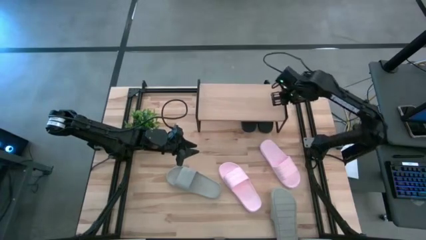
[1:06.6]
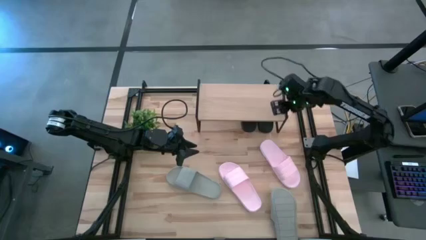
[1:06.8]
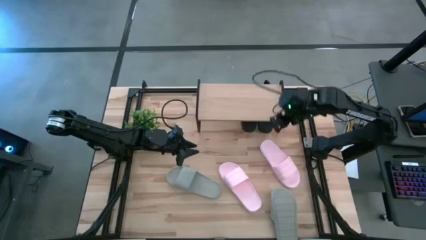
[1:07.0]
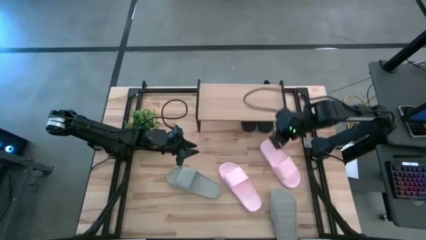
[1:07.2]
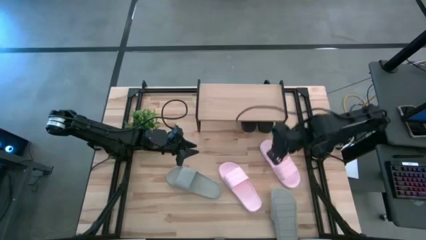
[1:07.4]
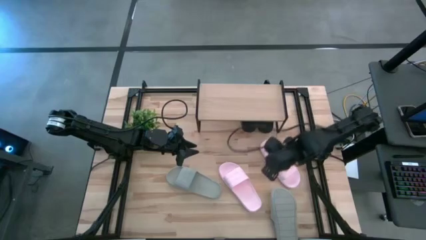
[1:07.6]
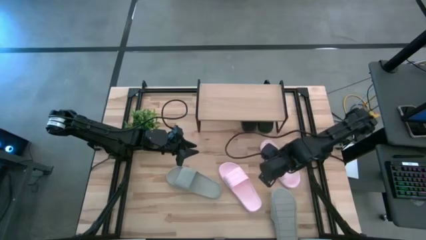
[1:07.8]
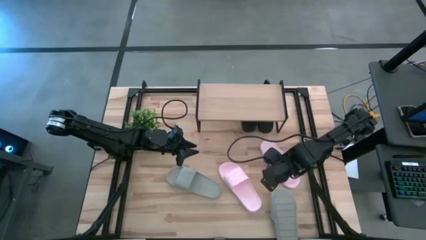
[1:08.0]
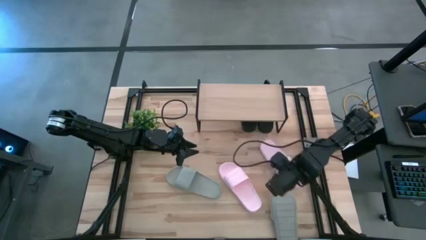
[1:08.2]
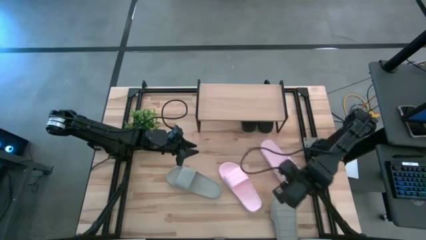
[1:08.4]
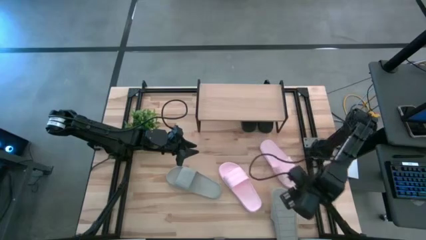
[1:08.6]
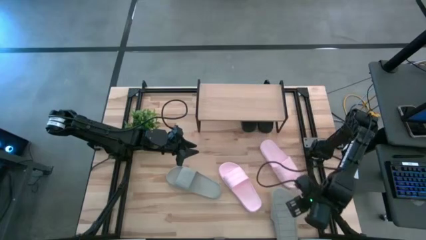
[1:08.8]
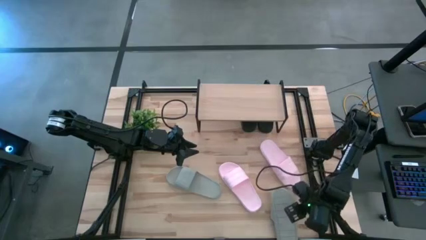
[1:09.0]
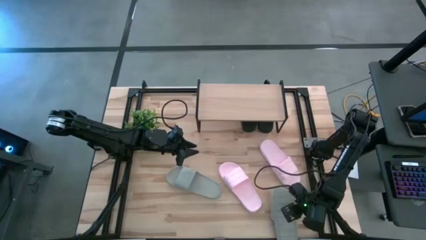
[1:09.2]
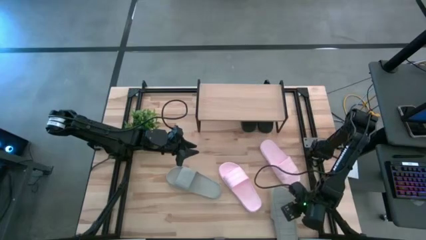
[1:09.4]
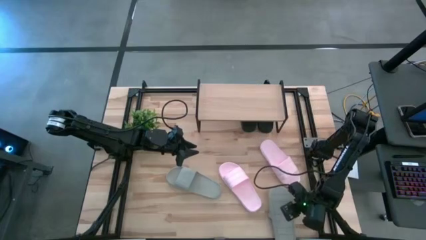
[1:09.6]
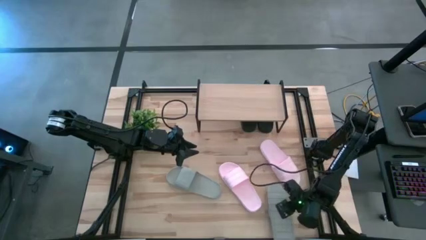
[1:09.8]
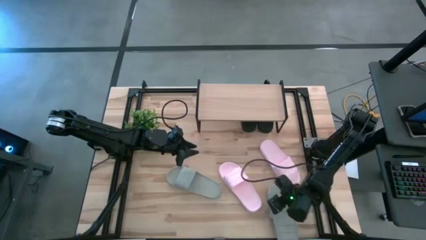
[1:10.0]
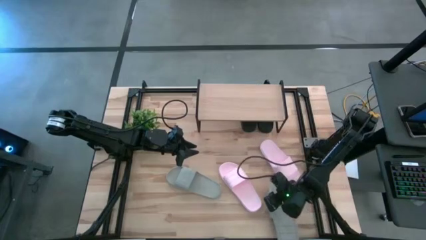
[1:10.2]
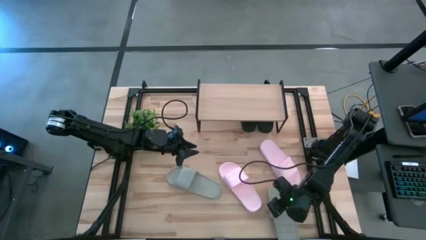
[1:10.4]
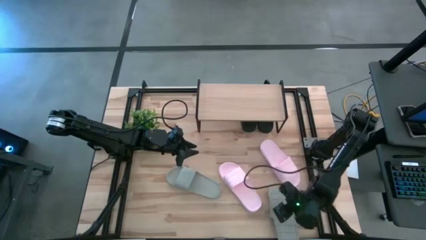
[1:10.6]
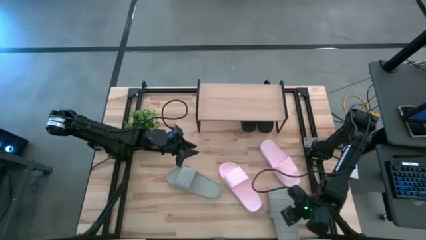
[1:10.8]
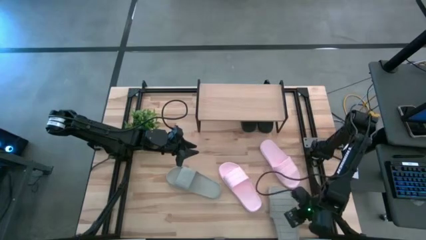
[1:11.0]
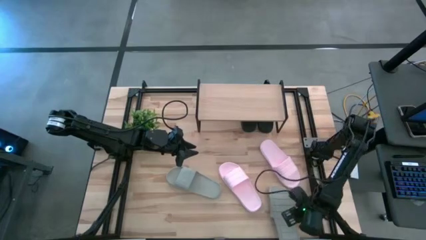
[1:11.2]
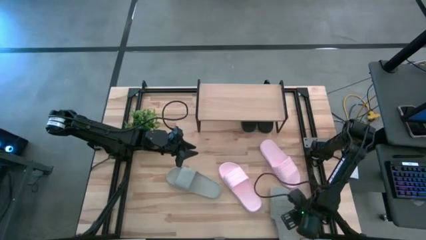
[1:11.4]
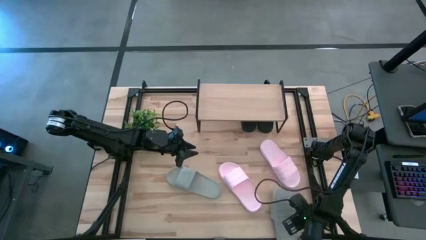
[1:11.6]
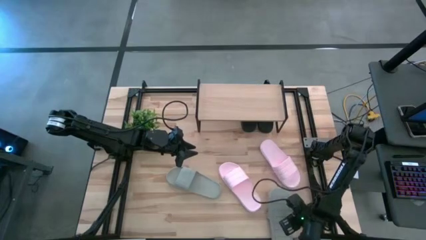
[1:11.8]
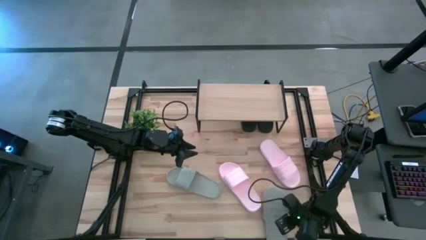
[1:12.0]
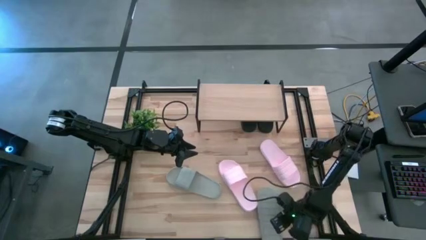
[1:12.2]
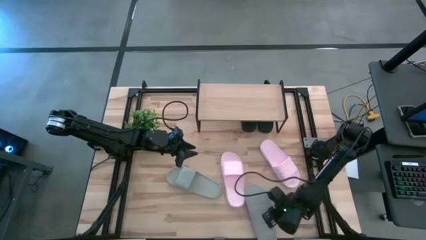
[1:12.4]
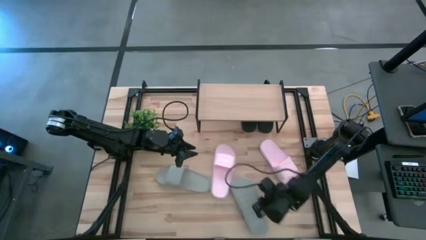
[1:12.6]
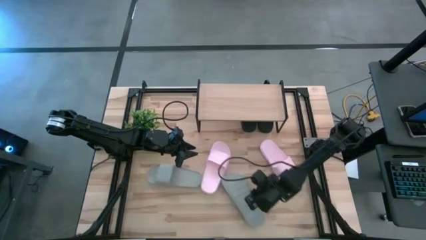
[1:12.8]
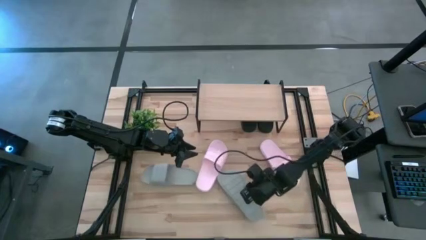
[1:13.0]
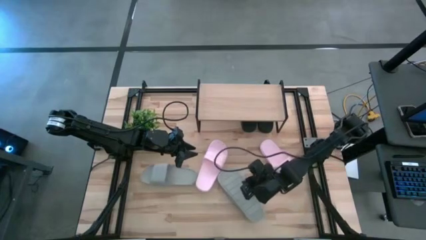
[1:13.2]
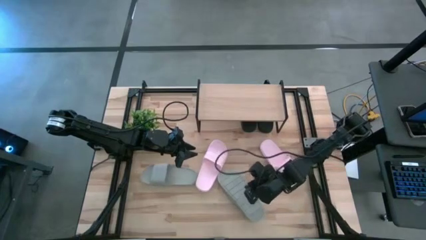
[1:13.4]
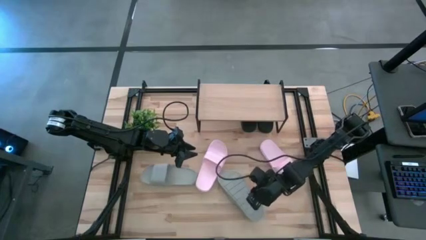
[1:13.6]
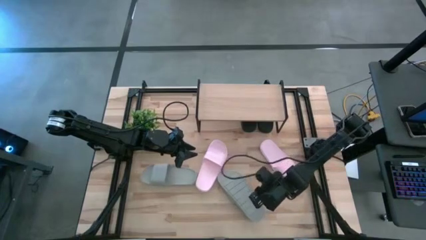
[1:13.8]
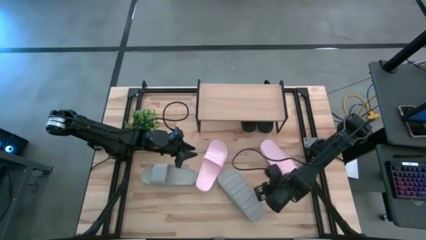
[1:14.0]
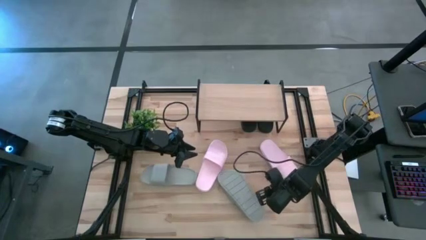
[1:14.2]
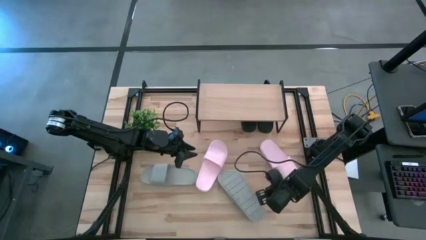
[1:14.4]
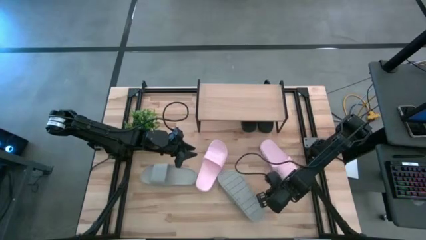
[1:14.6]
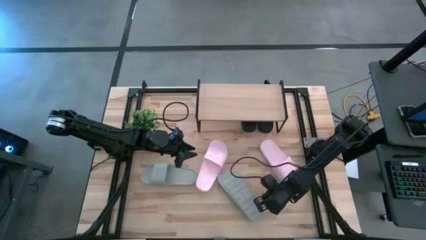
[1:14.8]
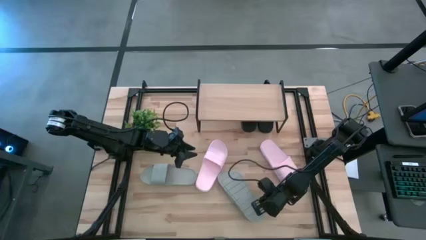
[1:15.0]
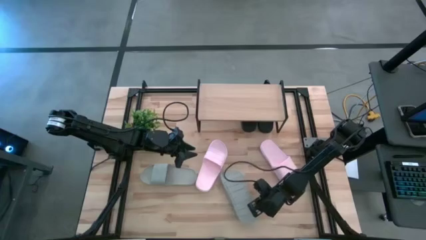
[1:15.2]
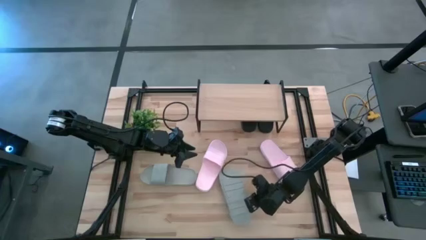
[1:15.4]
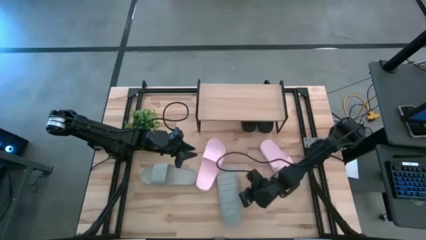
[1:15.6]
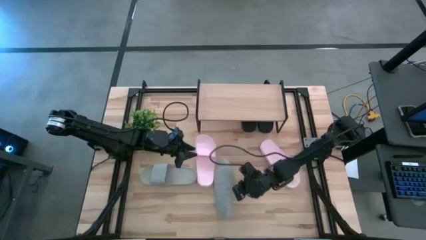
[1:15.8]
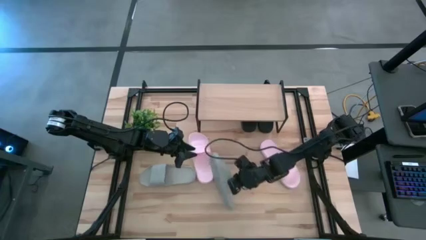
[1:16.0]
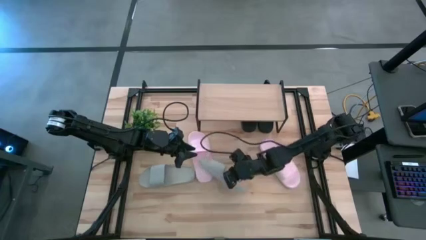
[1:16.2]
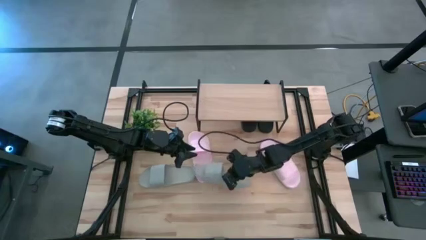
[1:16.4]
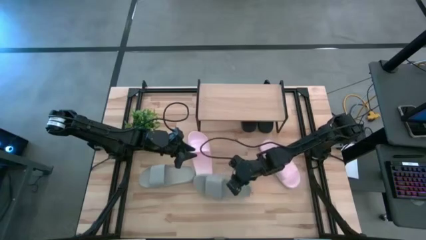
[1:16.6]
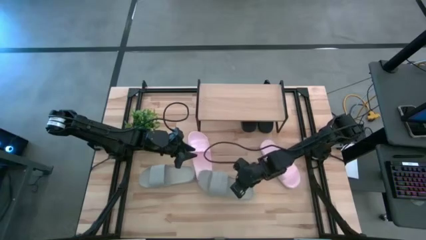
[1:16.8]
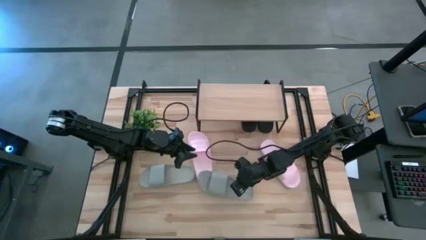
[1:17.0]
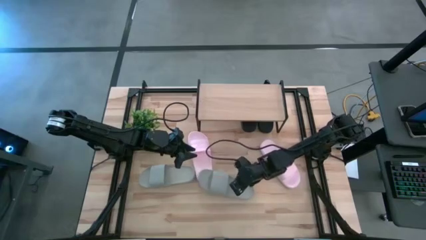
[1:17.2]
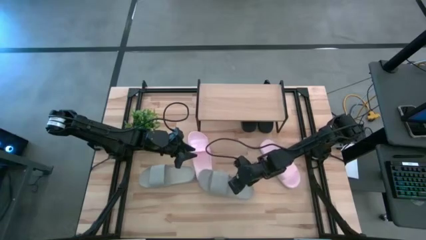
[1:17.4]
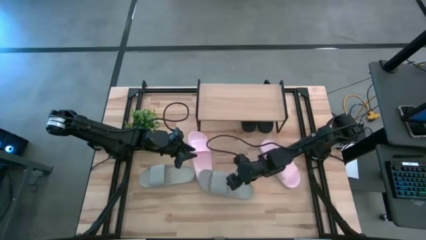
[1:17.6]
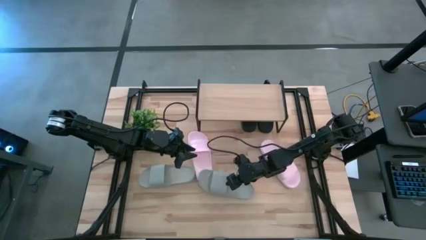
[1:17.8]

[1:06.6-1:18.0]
Task: Pick and place slides into the shelf
Put the bottom gray slipper on the shelf
